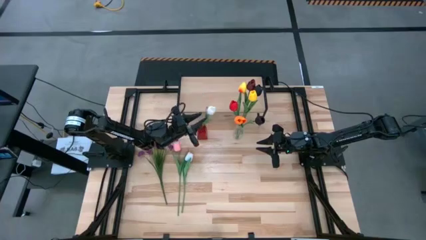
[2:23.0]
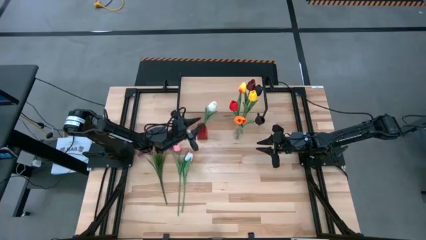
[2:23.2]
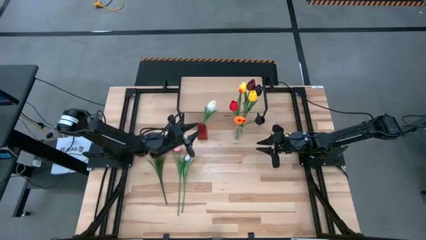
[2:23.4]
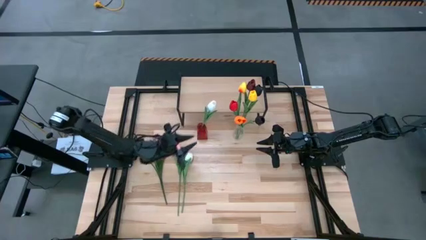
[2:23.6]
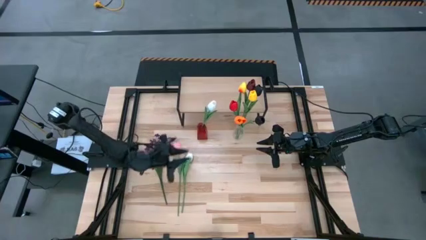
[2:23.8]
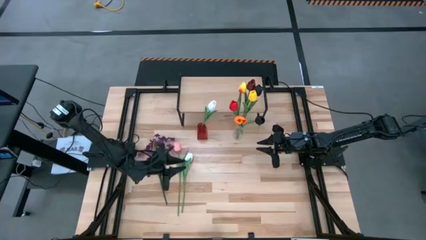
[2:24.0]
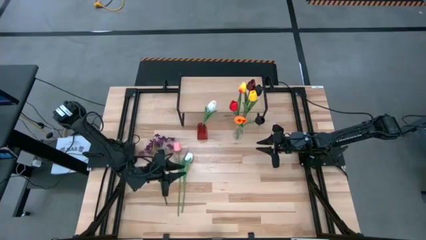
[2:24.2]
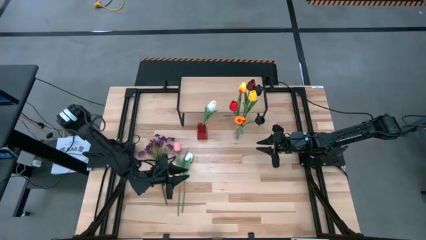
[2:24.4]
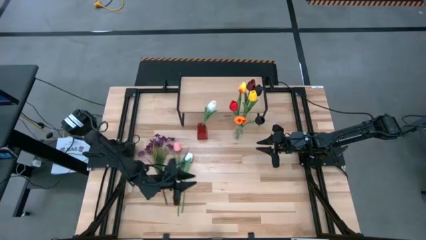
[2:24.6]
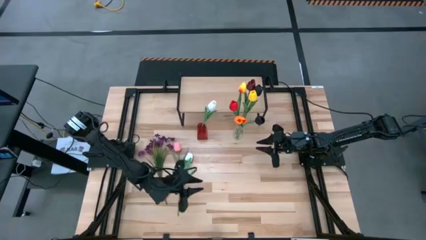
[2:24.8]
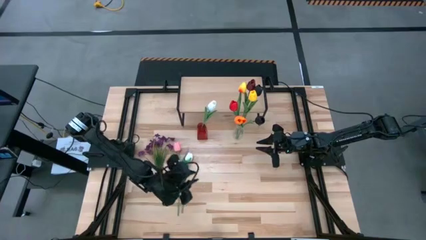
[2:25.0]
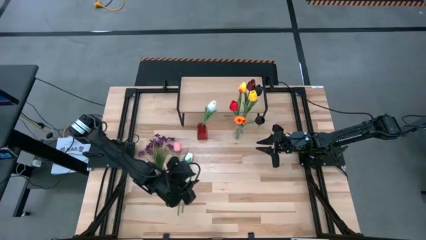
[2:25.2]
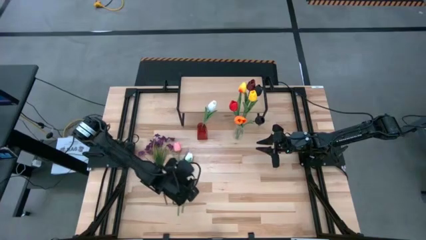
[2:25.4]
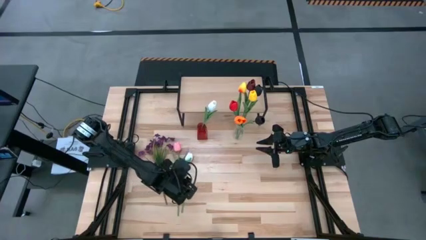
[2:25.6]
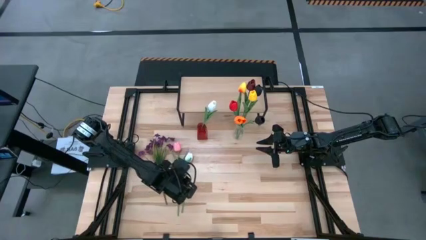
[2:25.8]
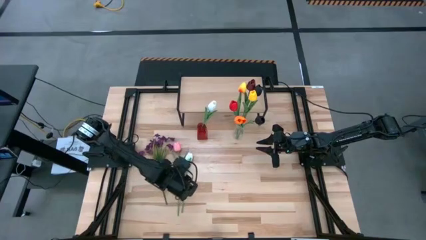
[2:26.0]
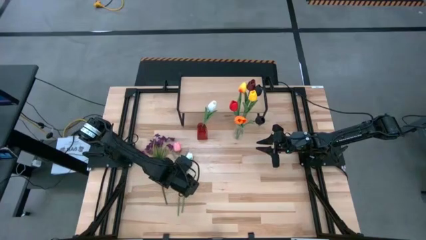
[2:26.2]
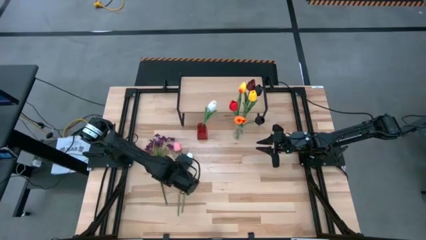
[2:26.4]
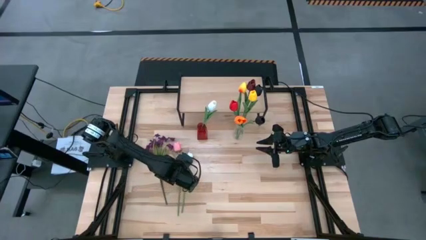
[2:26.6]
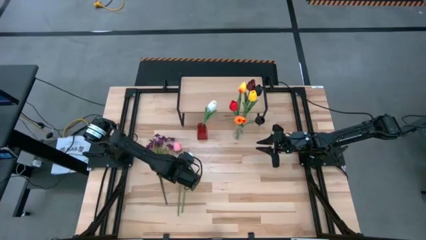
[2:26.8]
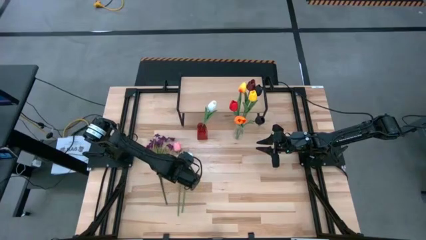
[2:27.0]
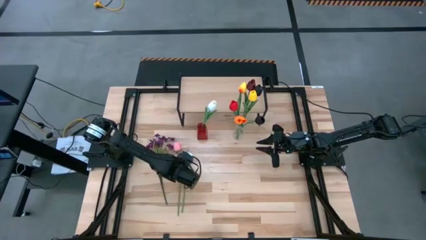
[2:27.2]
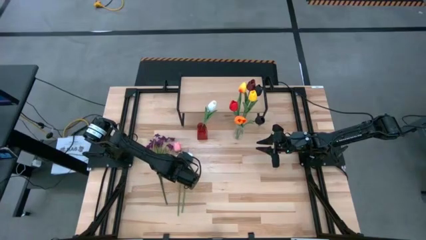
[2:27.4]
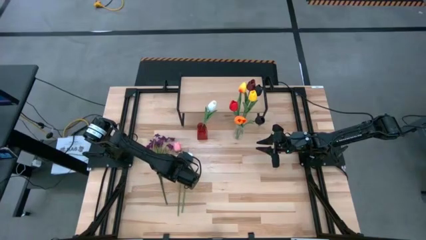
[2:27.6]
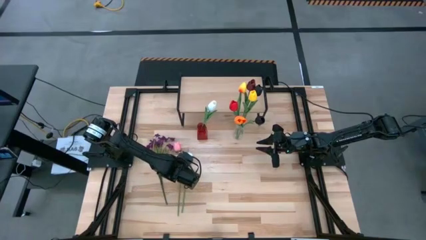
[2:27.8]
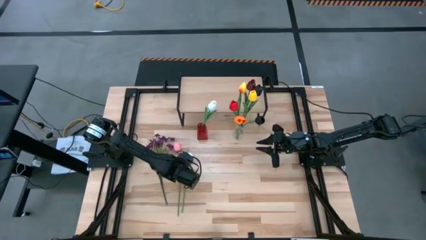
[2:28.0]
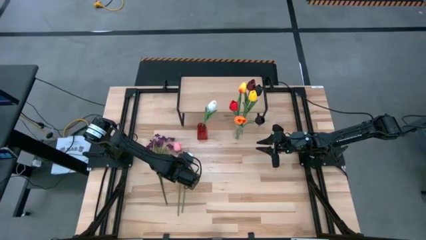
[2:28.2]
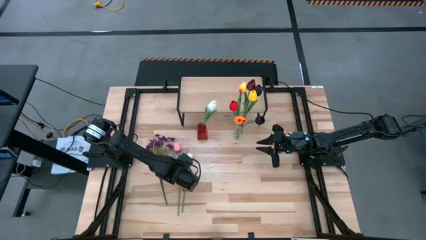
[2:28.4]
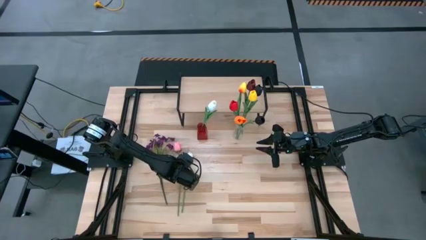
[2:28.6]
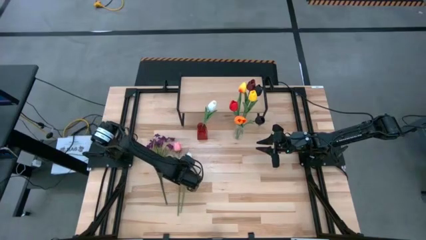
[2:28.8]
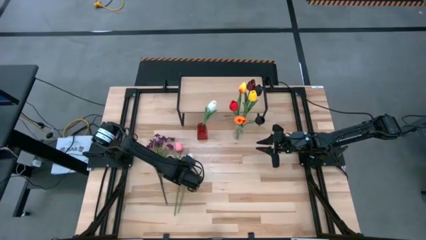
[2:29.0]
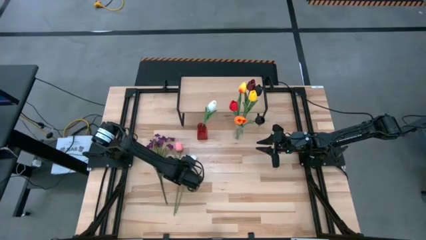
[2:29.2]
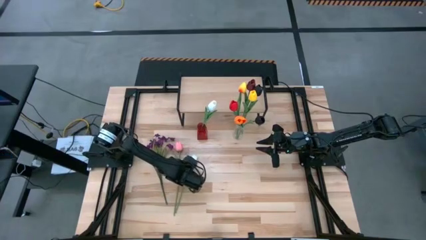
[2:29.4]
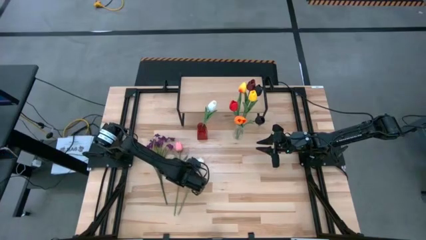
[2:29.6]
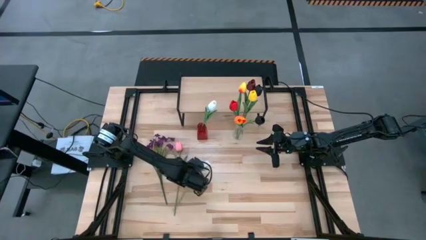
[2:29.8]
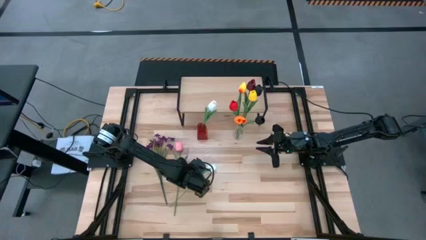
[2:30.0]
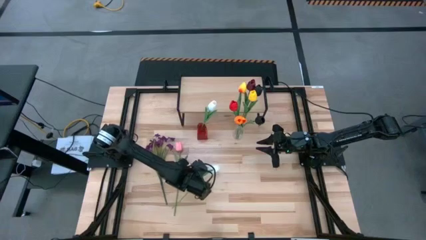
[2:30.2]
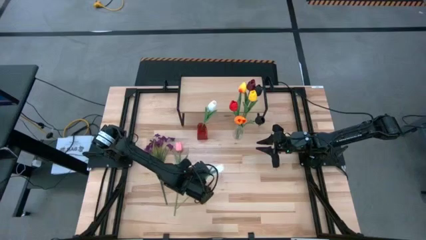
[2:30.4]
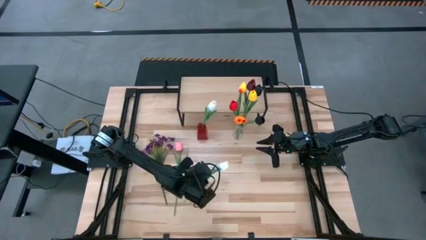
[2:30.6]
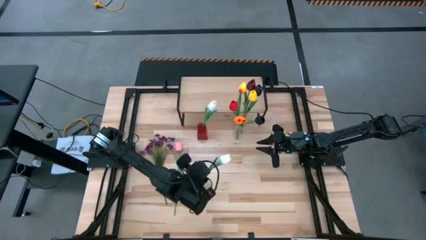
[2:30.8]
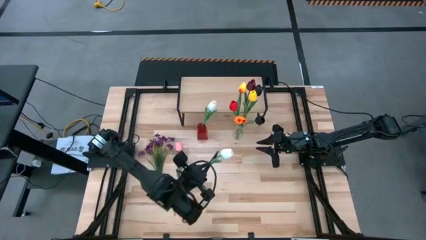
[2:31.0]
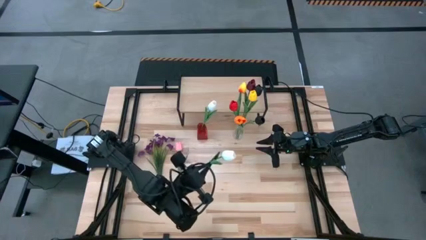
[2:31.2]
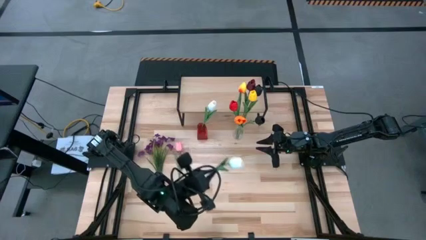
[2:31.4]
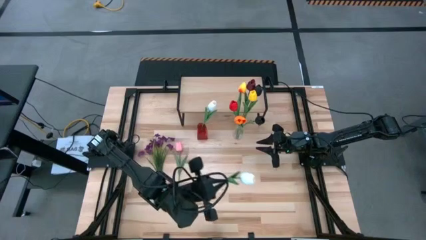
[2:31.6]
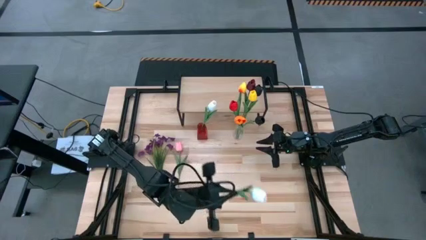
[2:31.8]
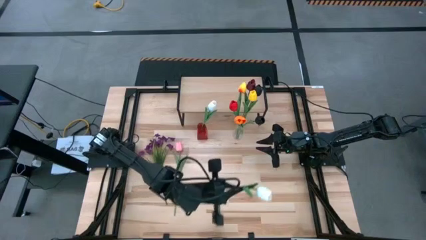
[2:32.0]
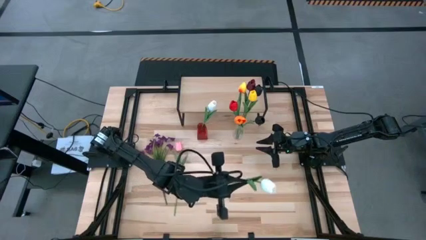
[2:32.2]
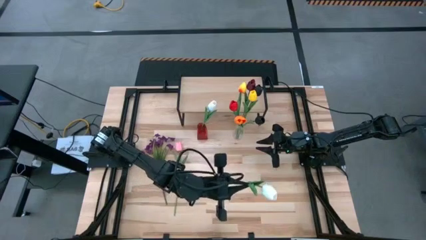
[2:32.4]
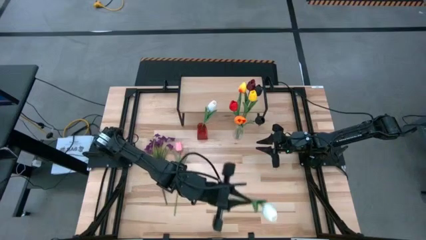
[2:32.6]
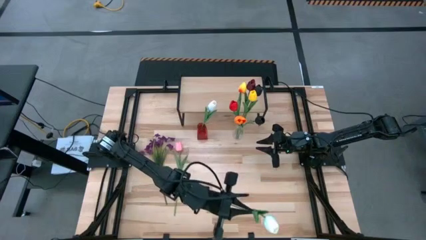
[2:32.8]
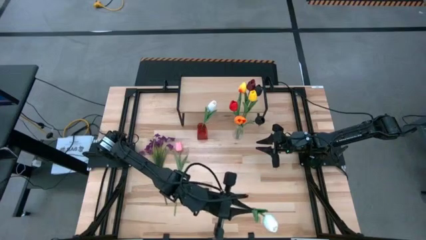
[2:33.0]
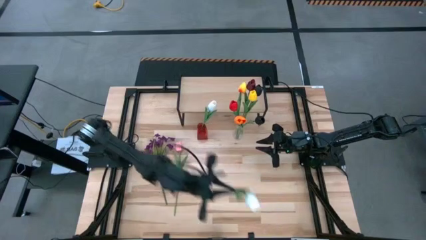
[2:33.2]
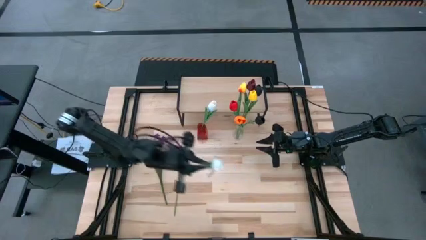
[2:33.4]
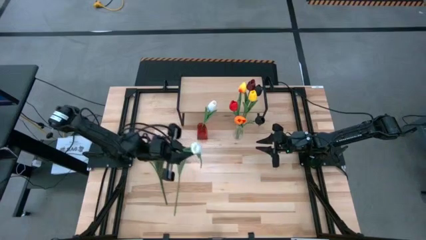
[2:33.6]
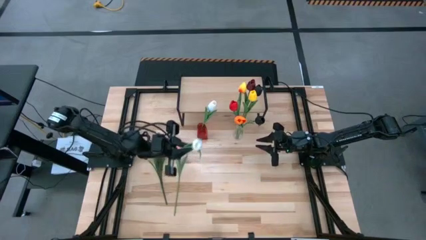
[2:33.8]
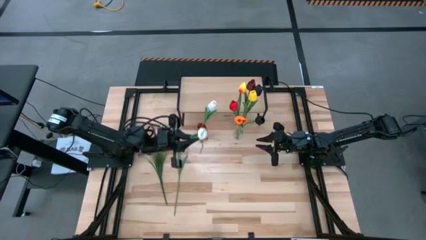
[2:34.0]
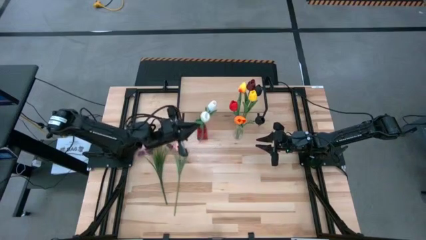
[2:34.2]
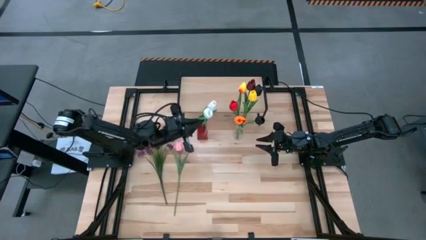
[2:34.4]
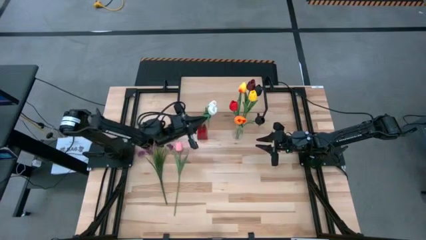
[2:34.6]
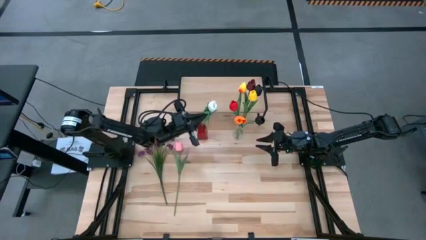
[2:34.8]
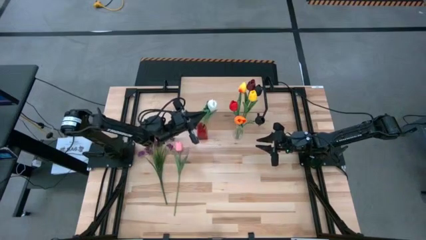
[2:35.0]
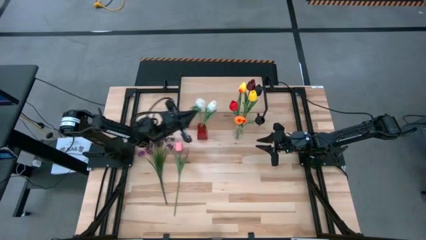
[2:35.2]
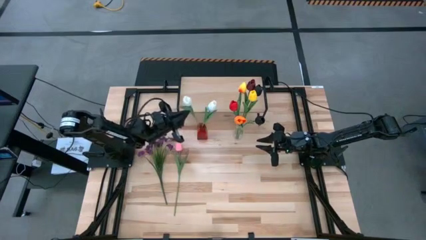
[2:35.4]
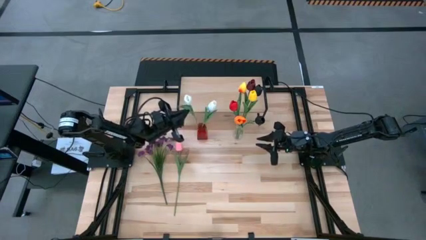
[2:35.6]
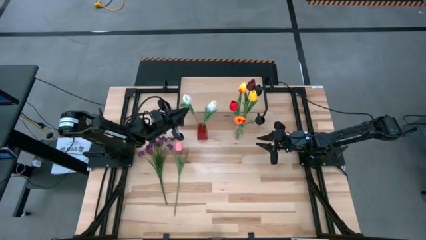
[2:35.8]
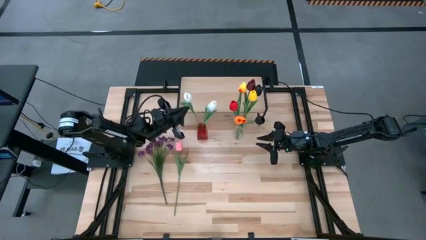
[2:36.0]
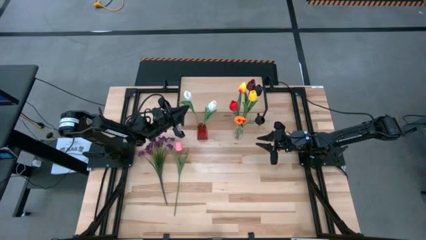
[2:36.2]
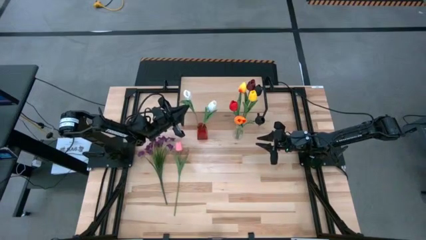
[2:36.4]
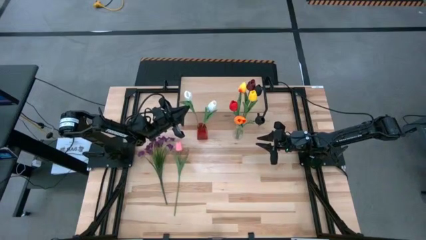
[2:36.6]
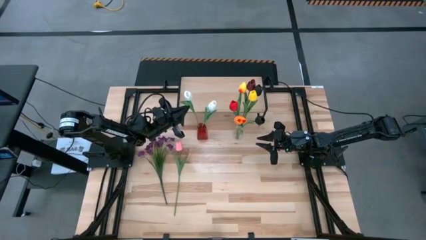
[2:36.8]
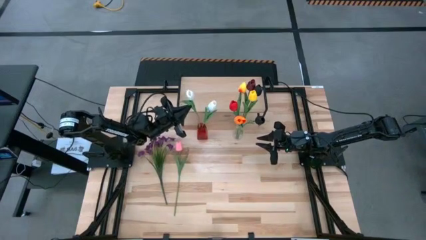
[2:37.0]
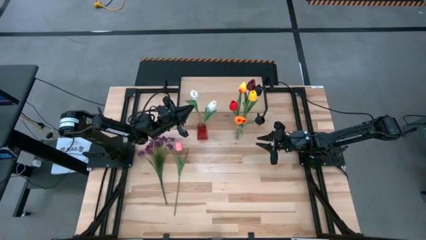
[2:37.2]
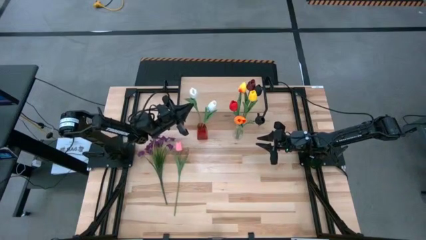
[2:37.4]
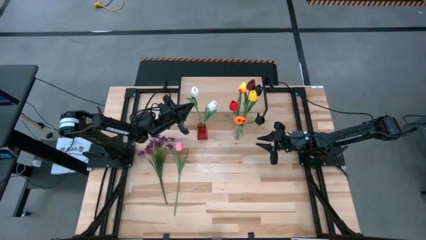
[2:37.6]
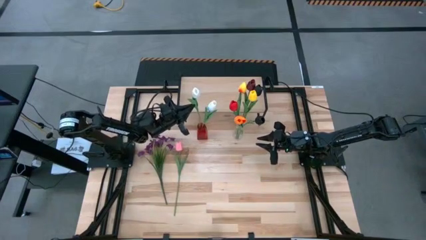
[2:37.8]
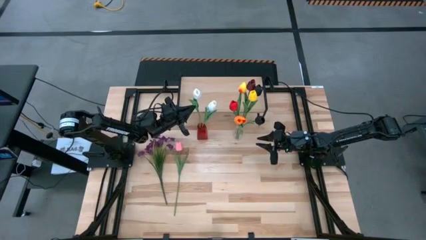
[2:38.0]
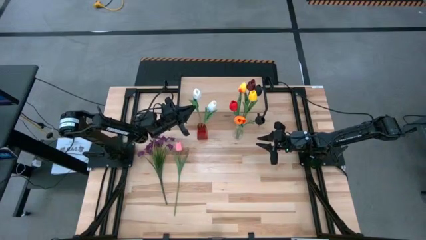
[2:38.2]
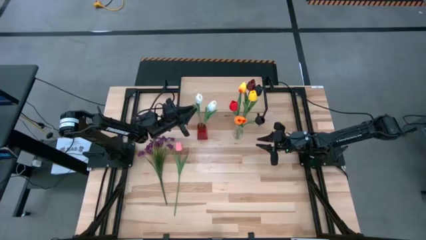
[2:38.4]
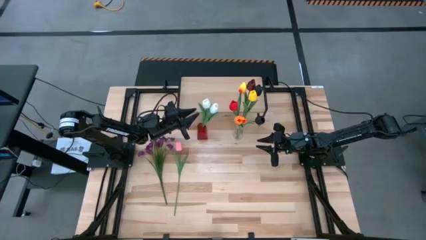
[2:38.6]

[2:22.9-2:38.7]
Task: Pick and place flowers into a vace then onto a shelf
Put the white flower into the red vase
